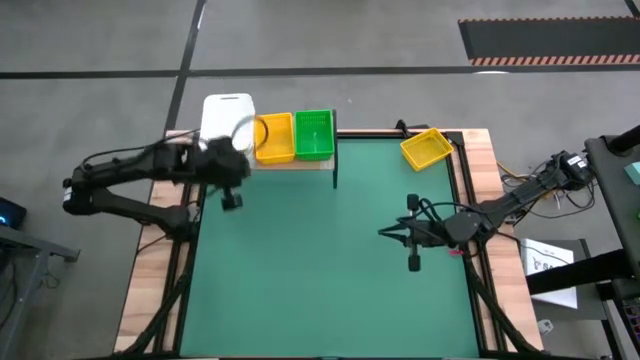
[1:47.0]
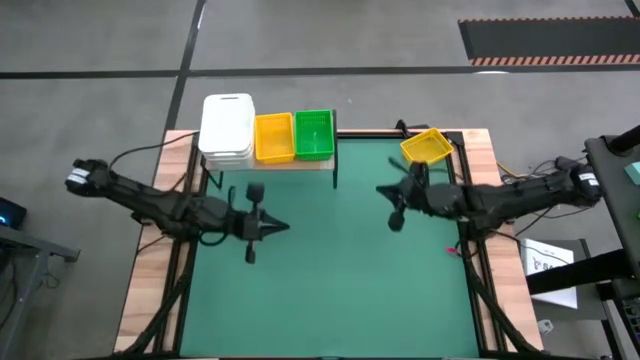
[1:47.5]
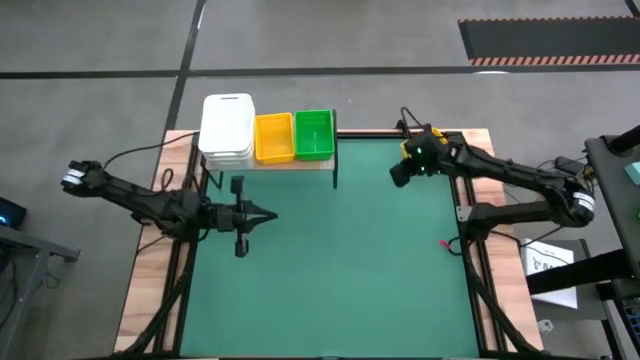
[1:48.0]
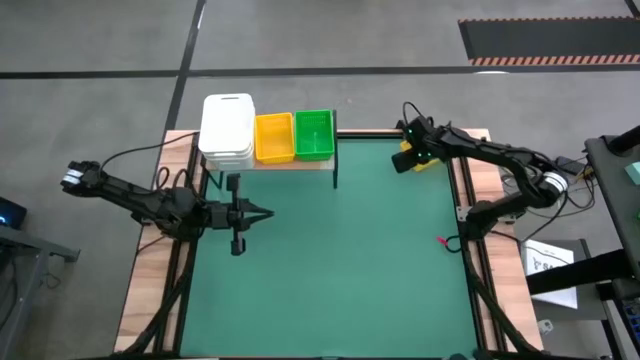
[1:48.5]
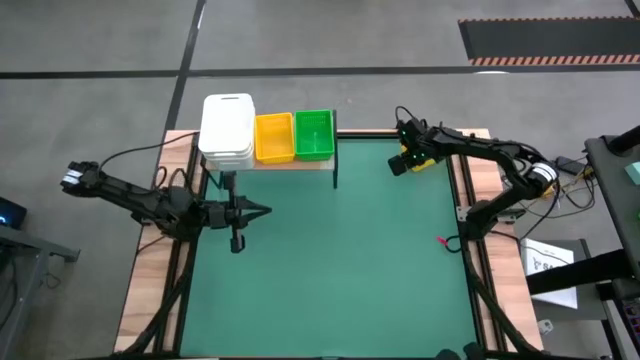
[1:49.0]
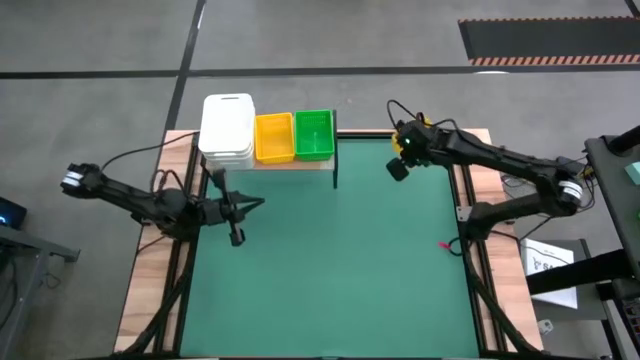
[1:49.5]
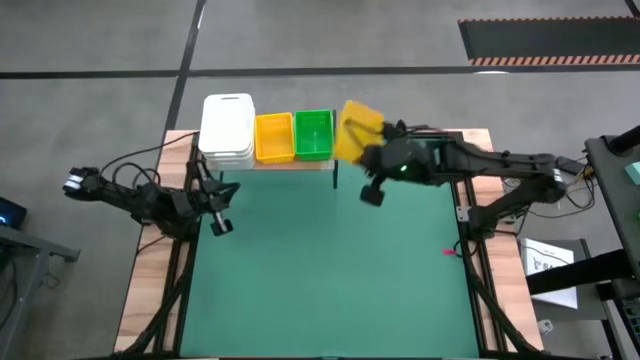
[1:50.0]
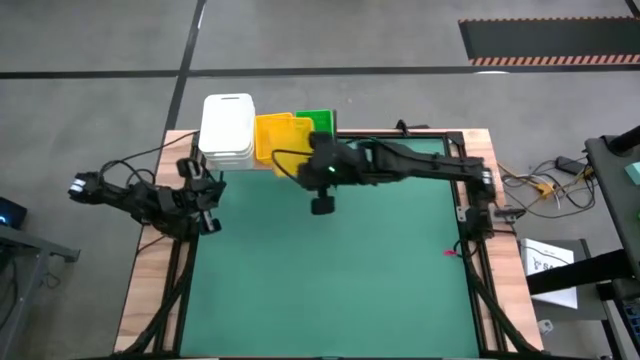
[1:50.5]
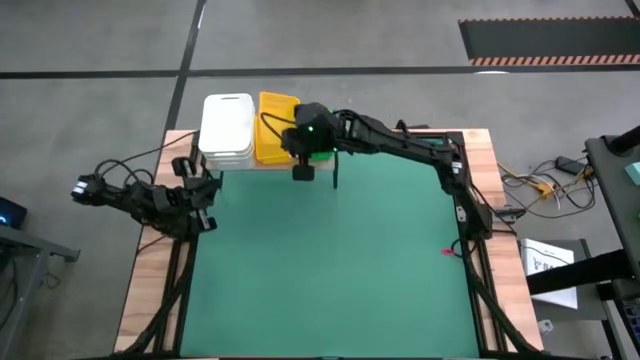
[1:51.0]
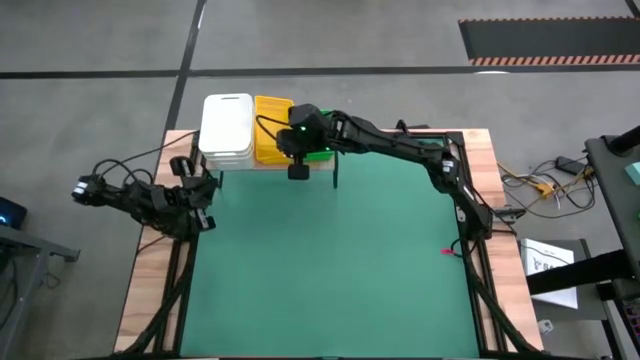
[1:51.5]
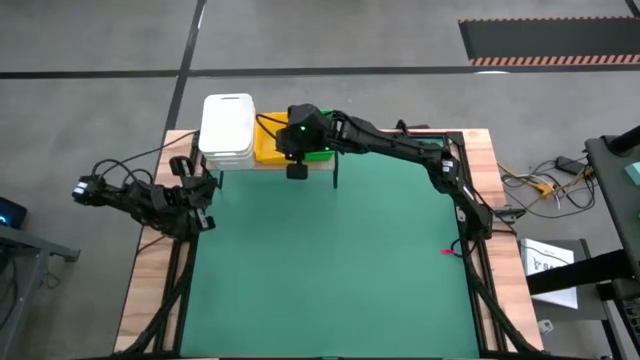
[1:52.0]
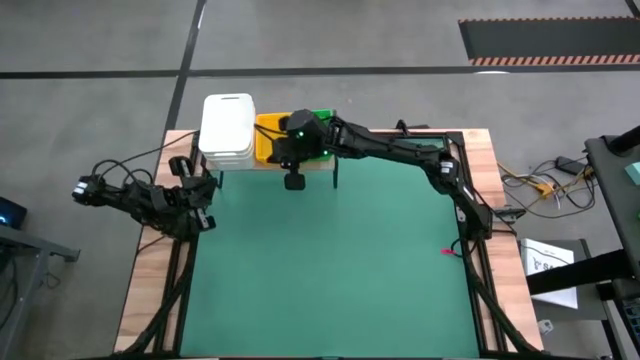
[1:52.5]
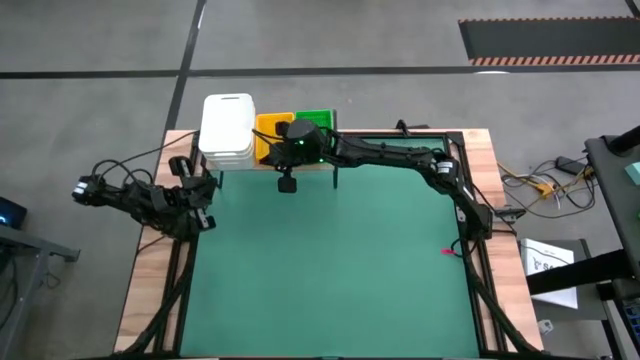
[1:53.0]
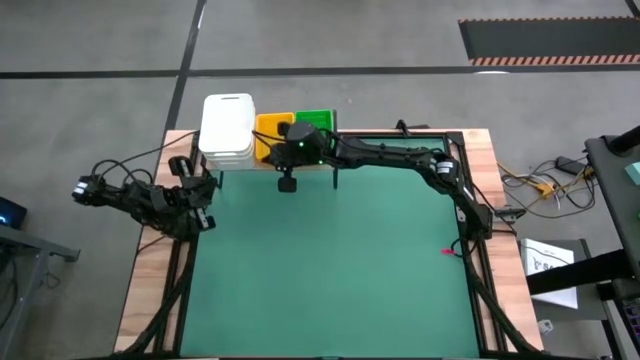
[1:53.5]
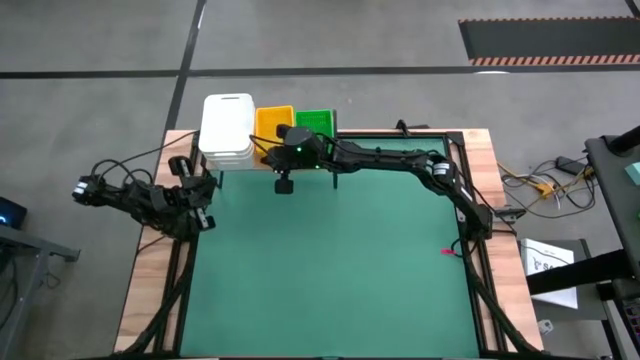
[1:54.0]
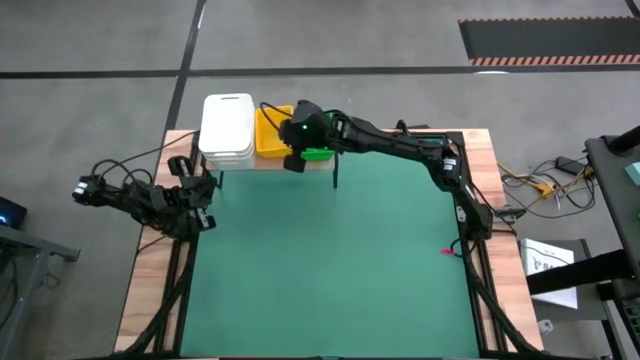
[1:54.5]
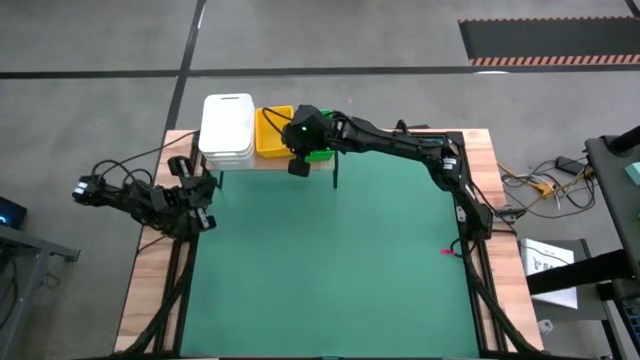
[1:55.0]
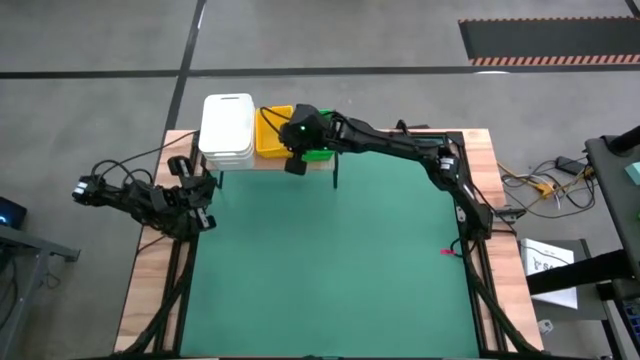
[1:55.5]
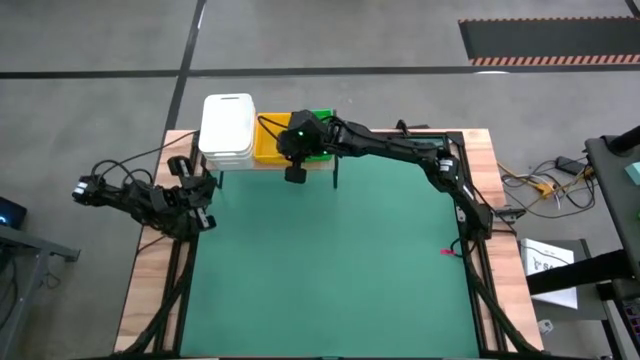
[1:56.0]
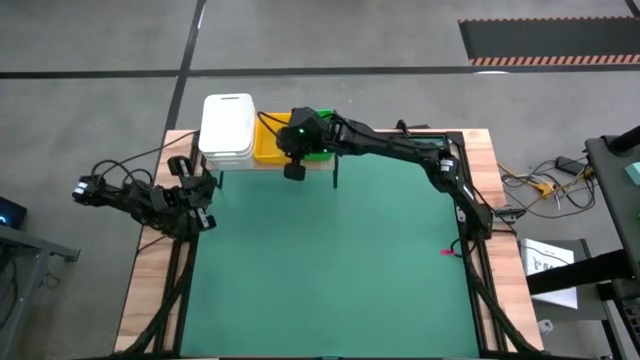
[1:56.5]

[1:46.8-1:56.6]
Stack the yellow basket on the yellow basket on the shelf

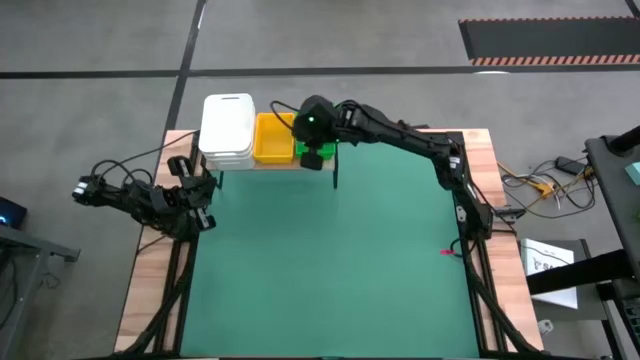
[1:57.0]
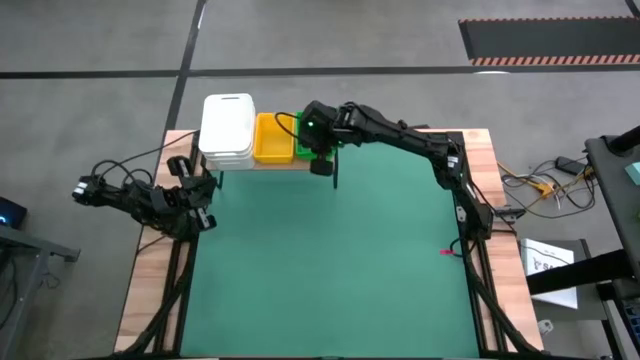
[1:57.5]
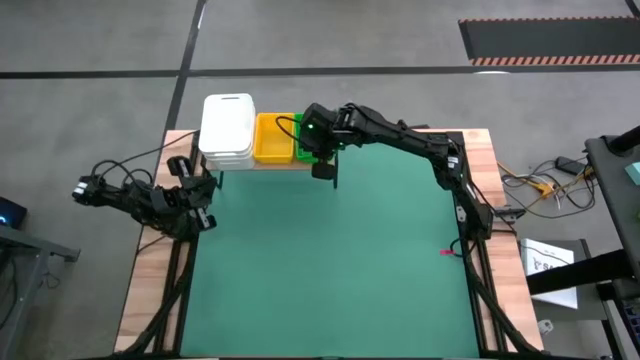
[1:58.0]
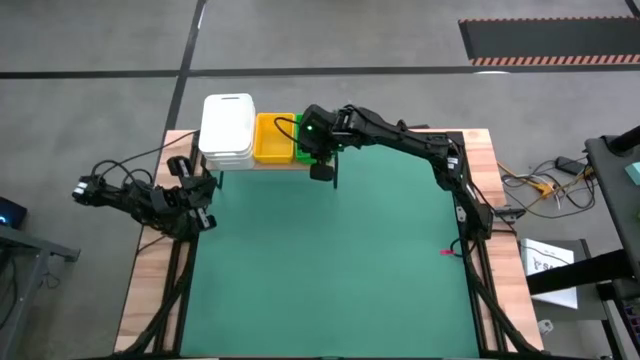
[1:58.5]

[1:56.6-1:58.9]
Adjust the green basket on the shelf

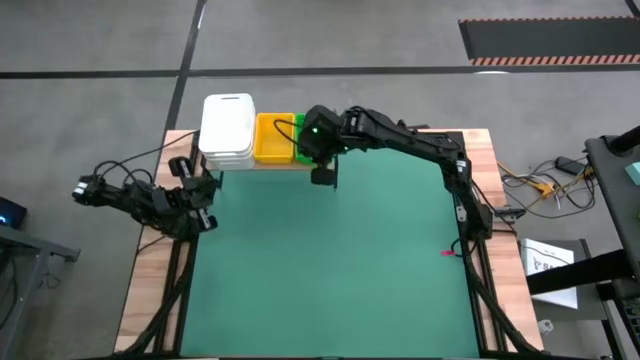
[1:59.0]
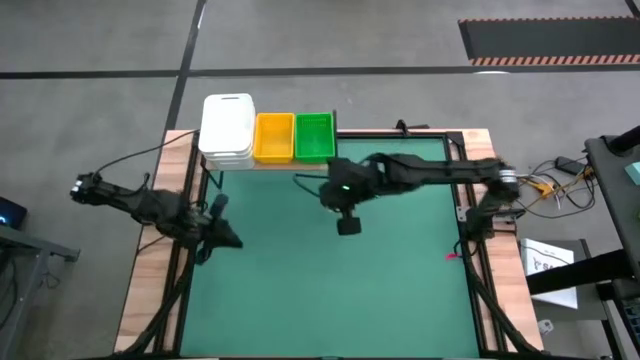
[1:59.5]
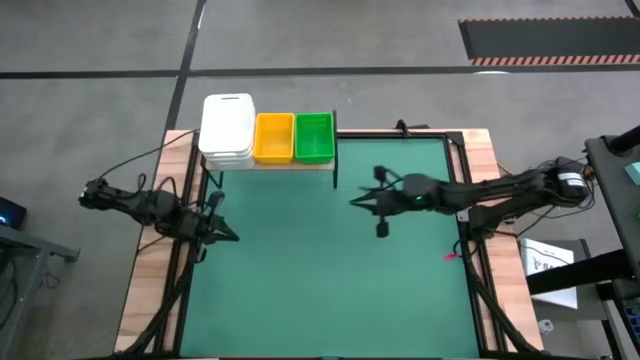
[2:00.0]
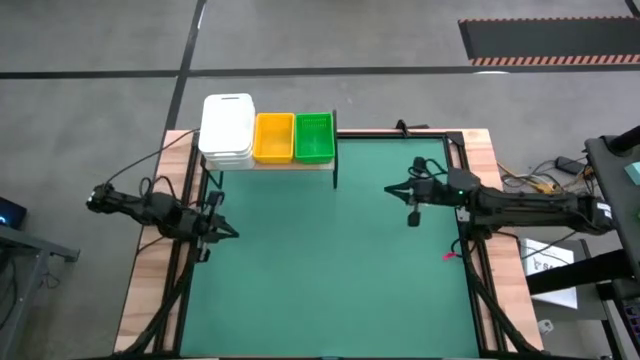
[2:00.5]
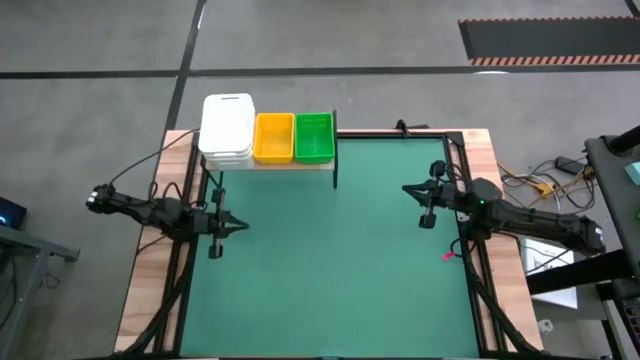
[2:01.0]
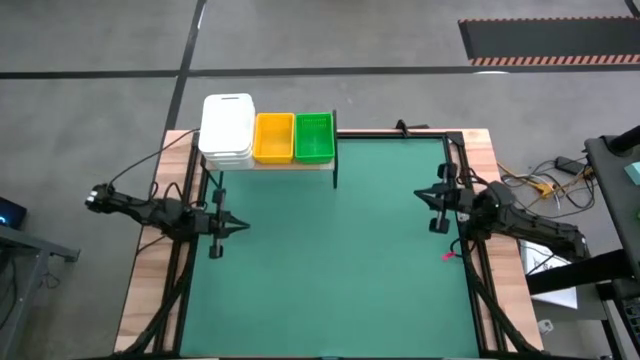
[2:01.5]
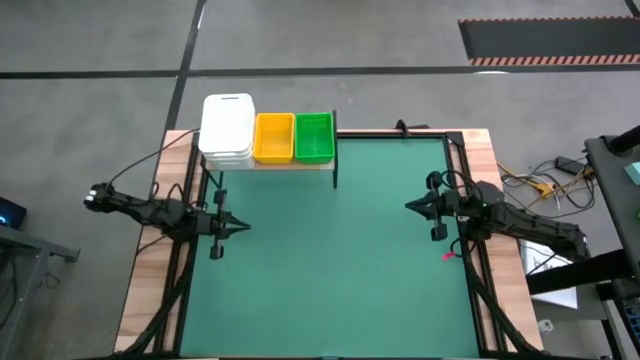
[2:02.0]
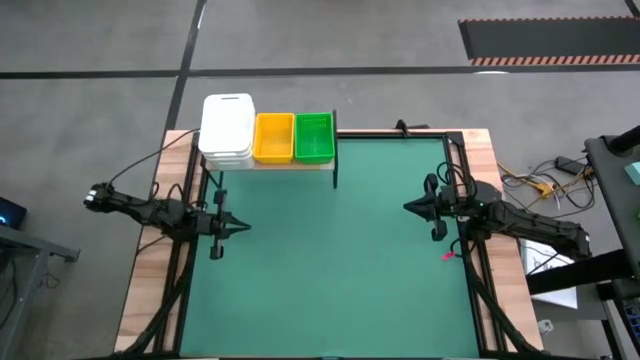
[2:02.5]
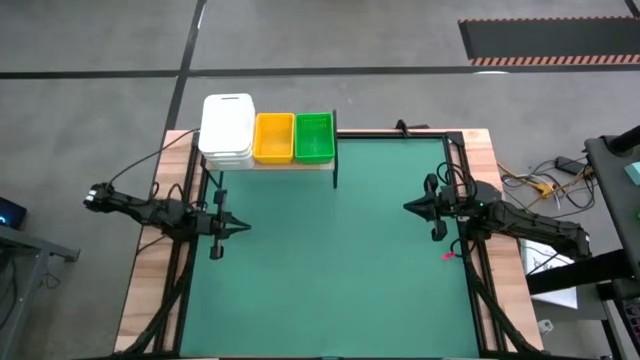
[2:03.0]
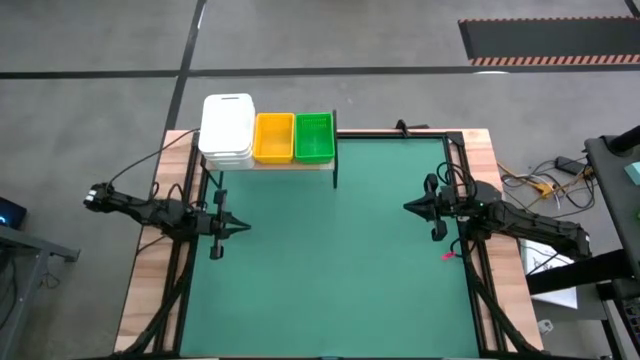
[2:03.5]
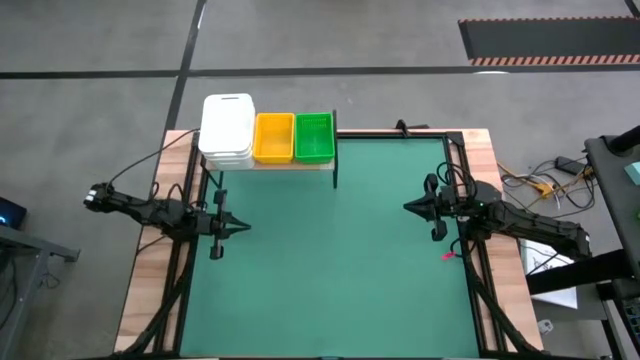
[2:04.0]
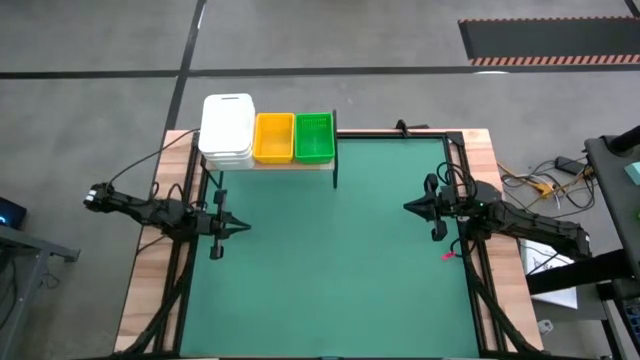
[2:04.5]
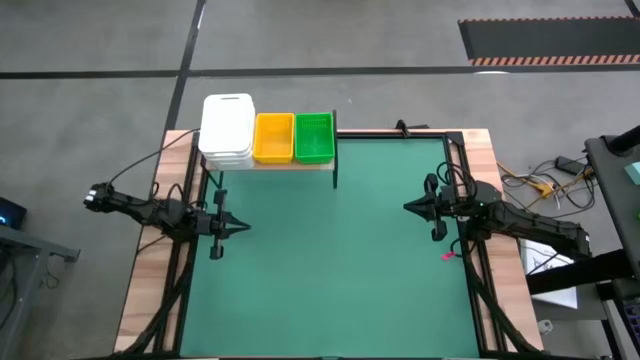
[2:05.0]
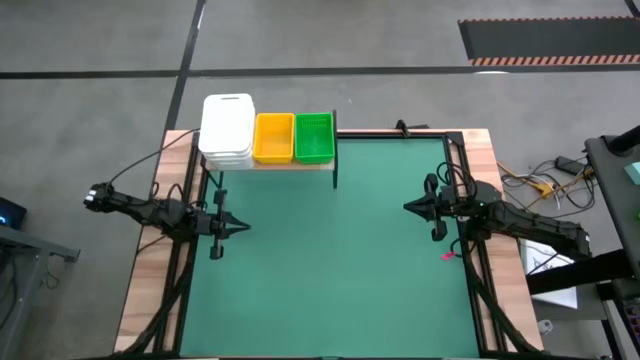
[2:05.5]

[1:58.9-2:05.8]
Return to Home Position
